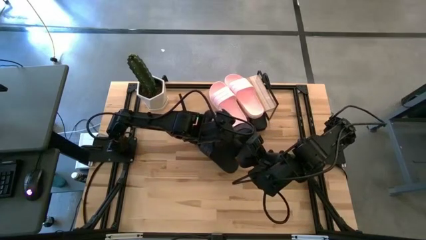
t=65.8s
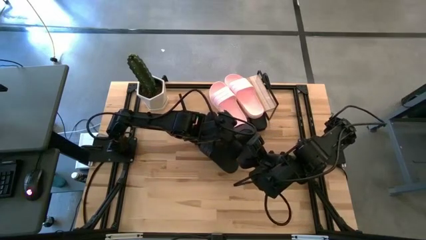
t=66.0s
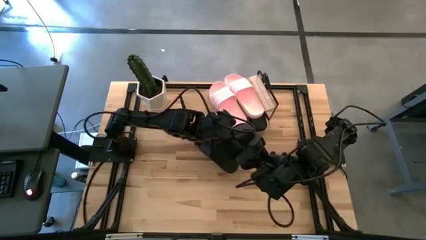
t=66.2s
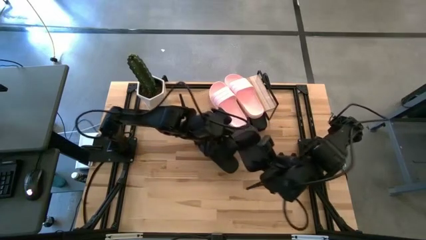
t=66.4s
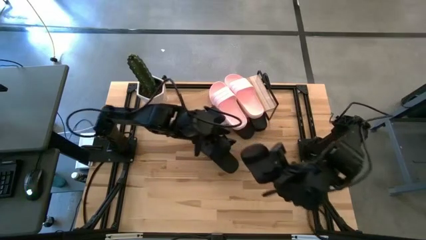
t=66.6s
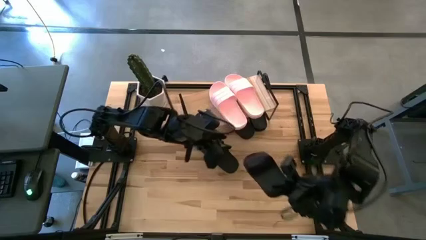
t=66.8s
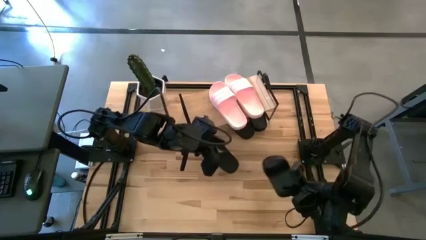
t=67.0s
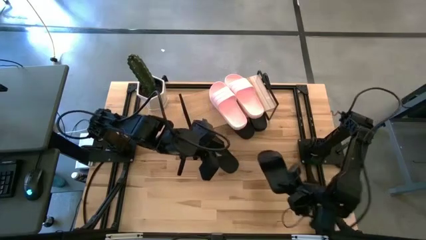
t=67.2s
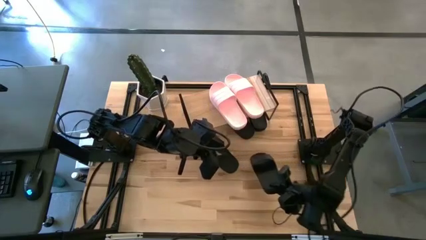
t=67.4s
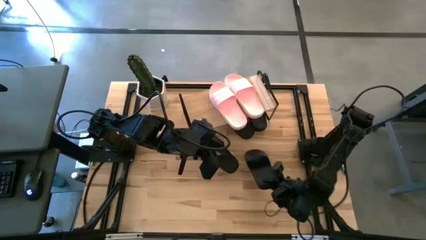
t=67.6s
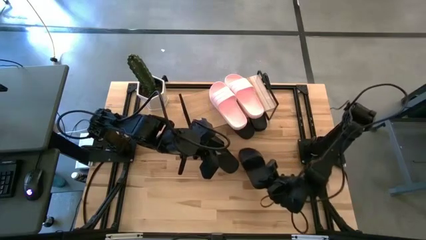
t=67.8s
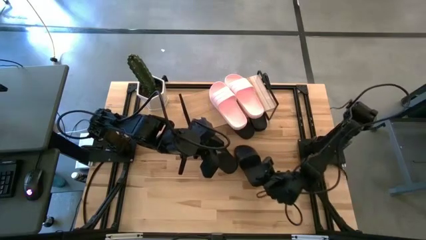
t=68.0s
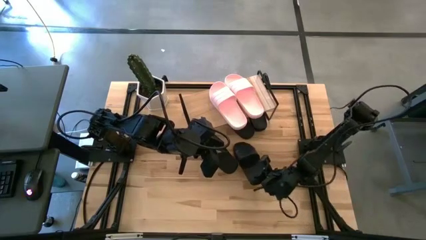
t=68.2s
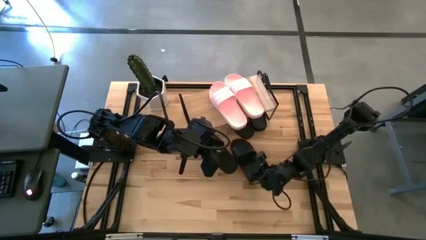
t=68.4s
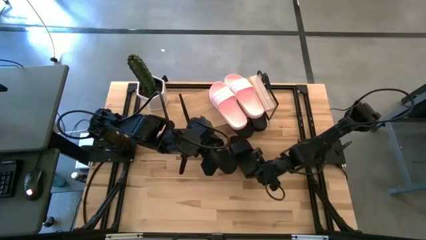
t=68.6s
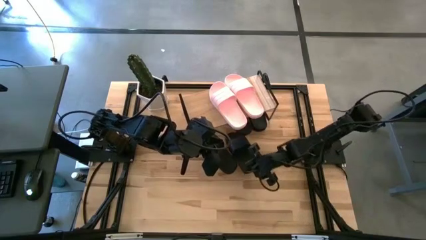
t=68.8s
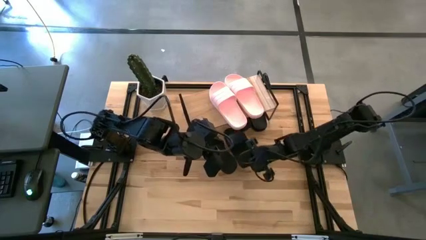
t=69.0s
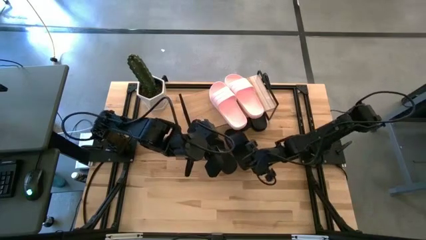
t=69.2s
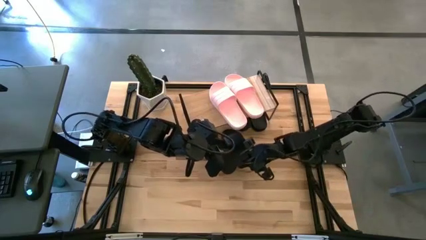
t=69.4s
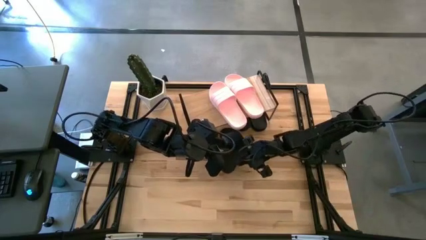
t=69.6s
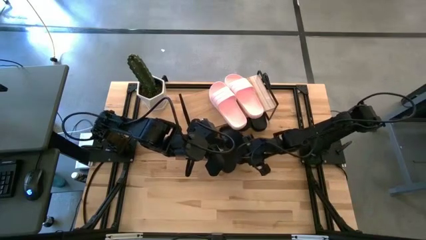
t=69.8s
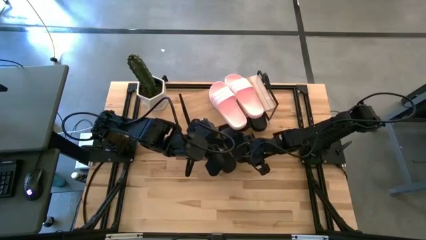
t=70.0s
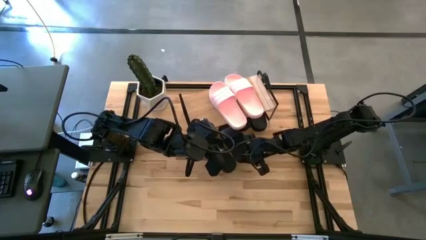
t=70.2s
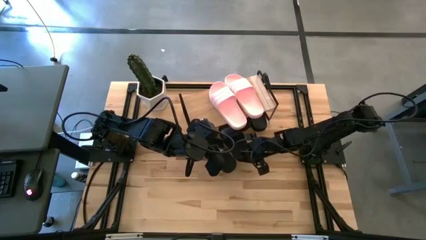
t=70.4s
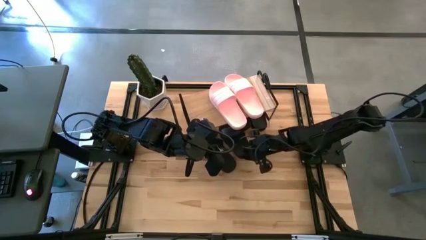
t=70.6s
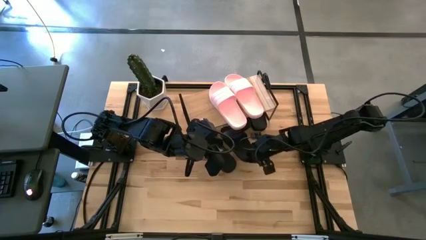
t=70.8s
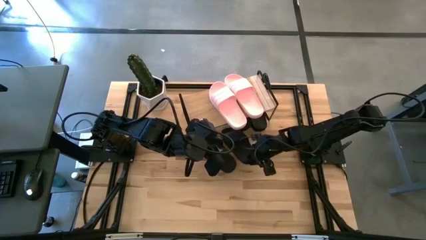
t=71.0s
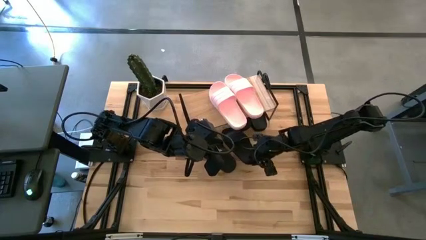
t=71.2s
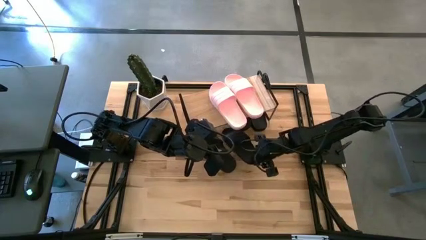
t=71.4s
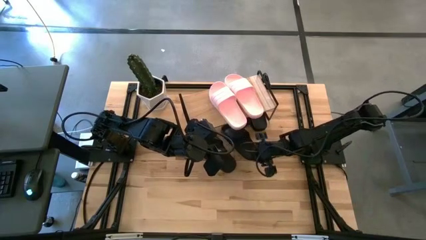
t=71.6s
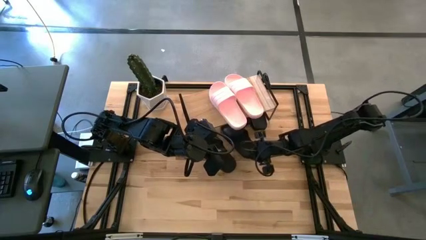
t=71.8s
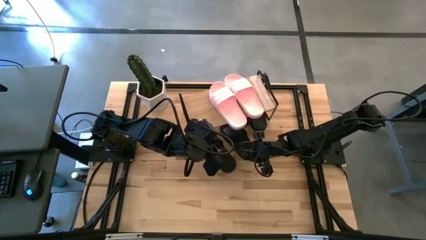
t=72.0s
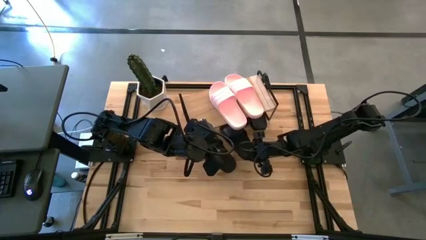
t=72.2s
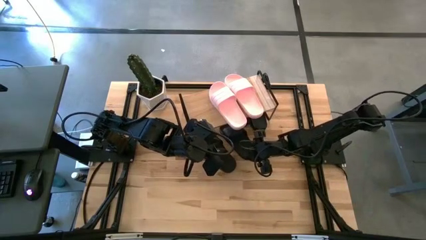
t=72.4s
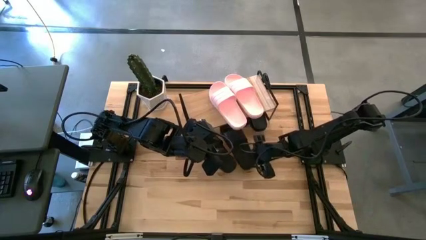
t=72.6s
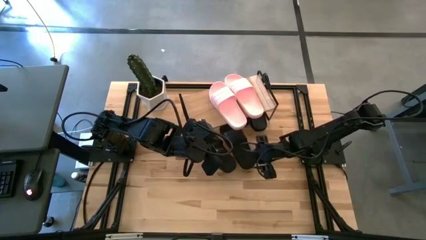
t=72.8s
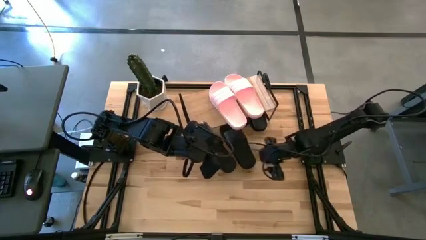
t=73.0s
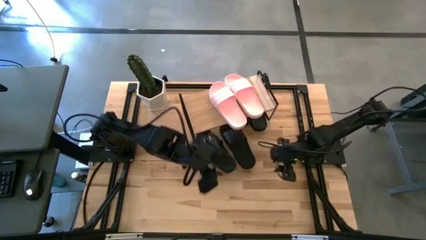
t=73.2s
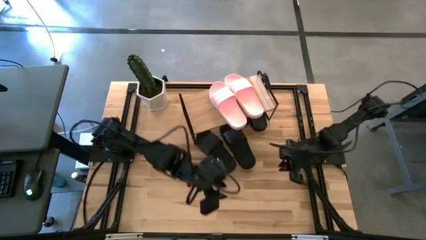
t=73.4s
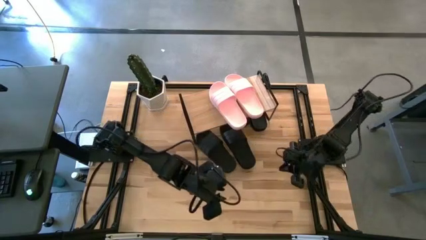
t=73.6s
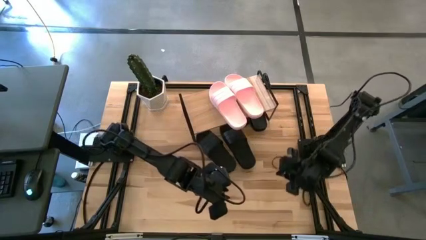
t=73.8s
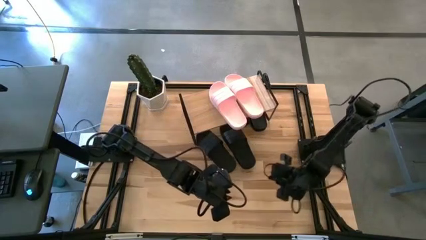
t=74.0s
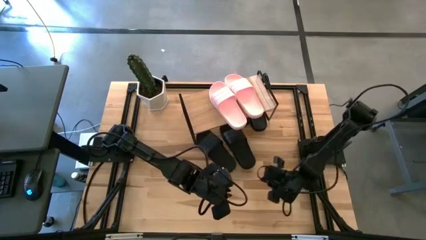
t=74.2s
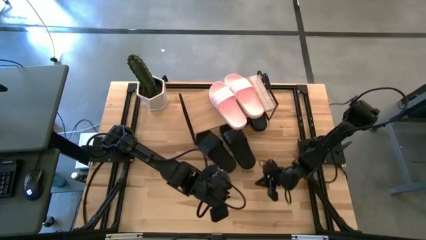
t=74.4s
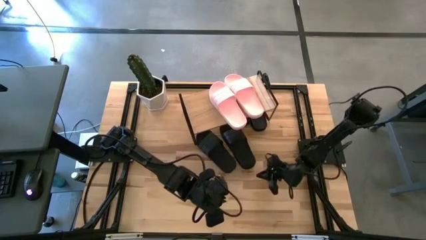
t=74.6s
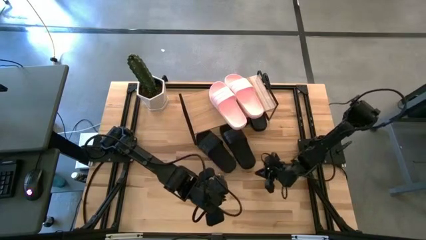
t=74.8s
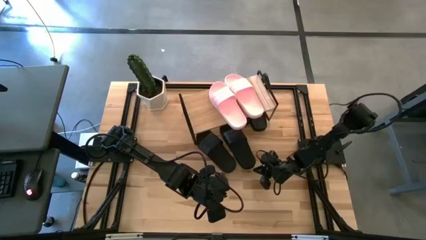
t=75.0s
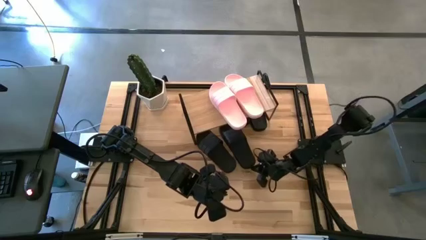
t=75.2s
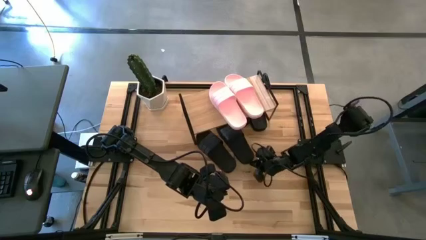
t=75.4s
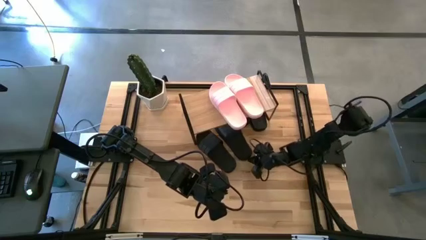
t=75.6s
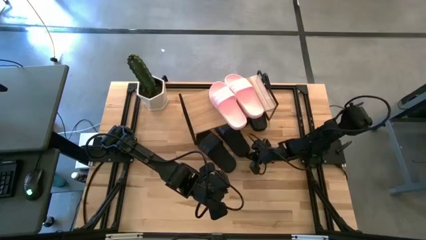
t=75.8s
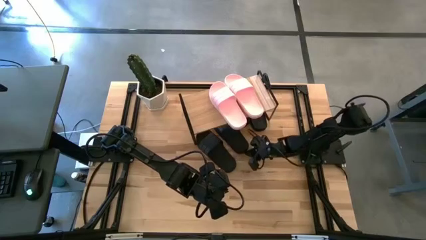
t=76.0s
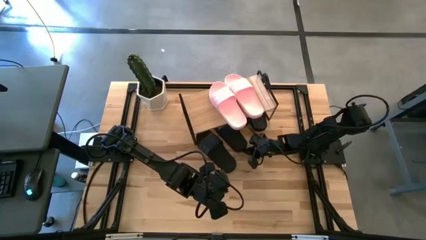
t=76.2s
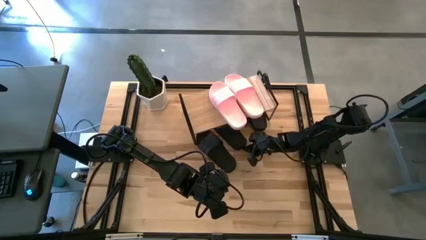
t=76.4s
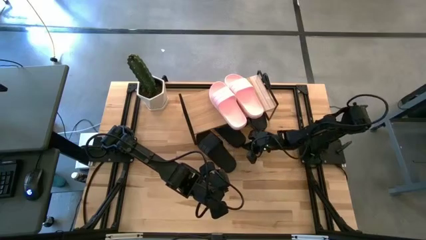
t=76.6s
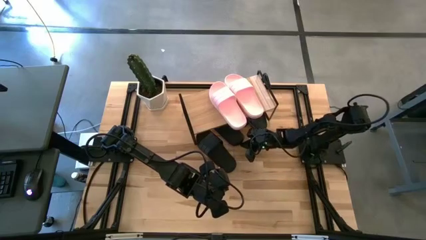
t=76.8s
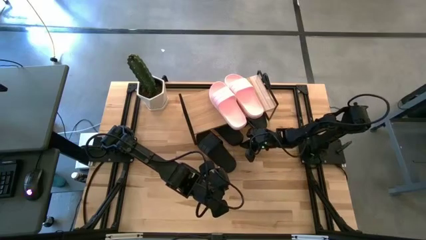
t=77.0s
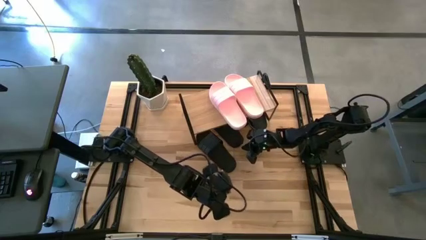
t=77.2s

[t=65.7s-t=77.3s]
Task: Pick and place slides into the shelf
Put the black slide under the shelf

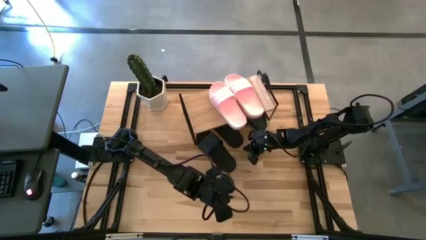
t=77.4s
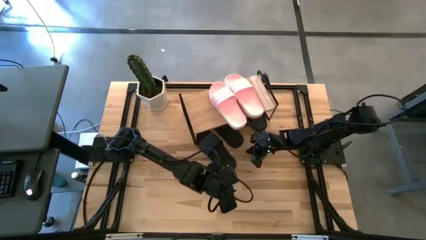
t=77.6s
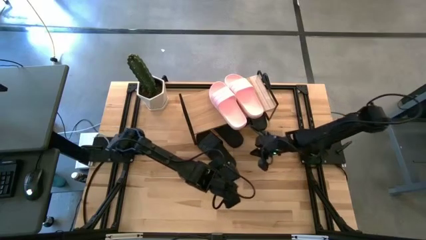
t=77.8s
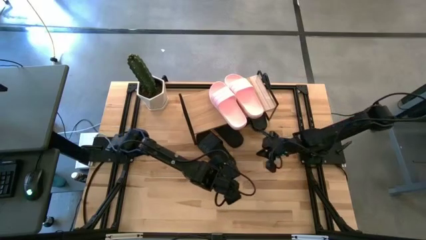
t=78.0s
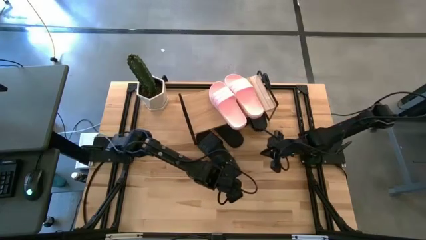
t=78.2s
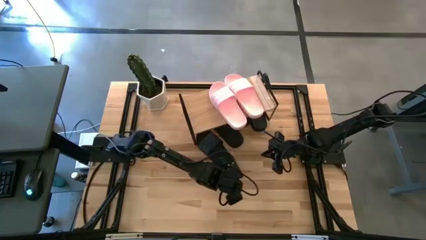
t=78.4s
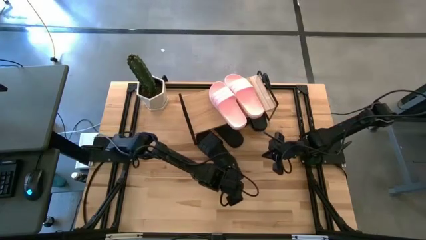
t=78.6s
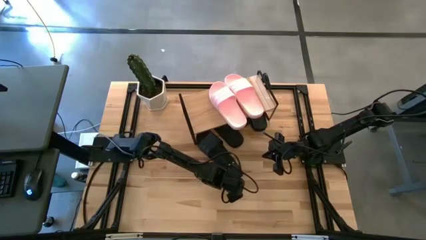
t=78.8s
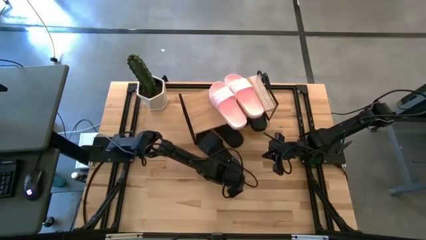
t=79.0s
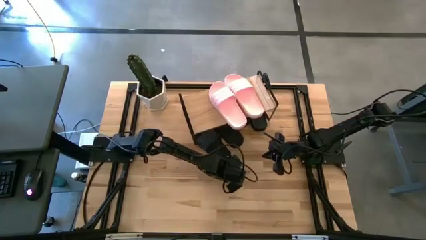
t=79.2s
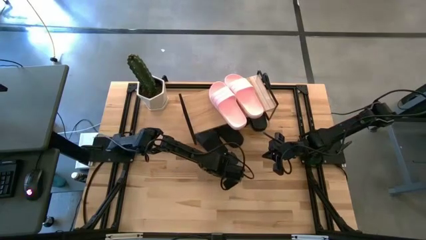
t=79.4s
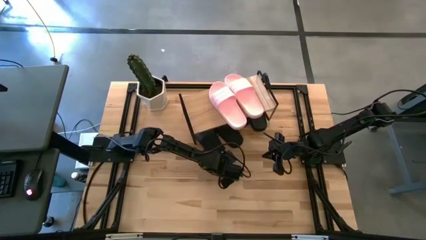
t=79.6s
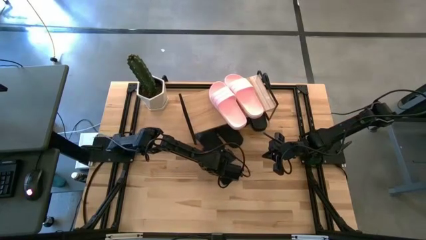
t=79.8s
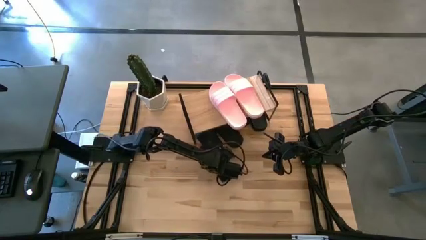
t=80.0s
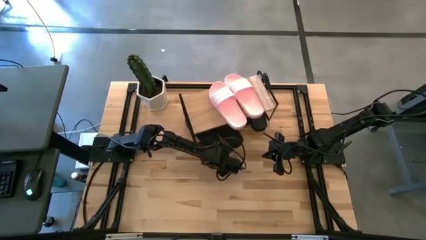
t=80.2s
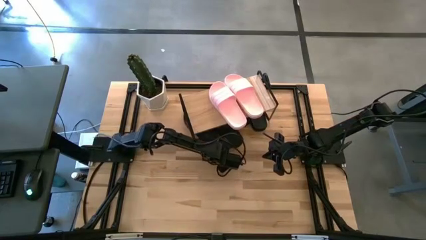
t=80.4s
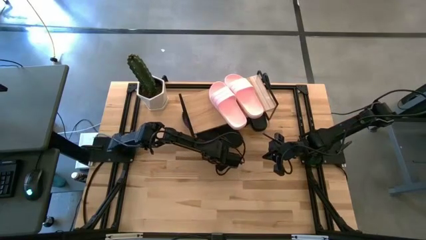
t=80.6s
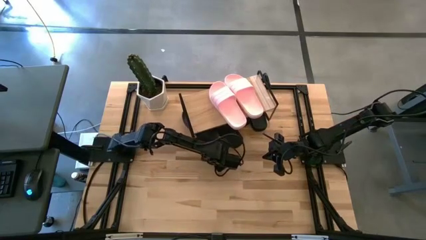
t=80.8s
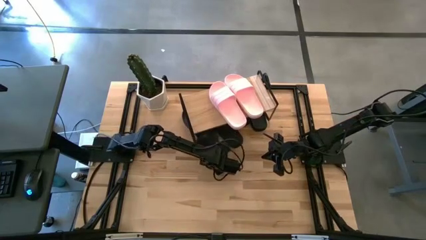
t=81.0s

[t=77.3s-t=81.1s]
Put the black slide under the shelf

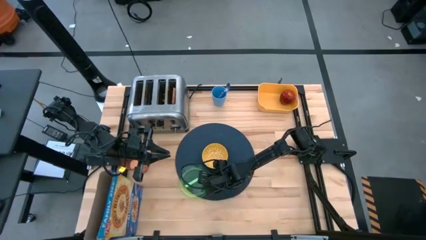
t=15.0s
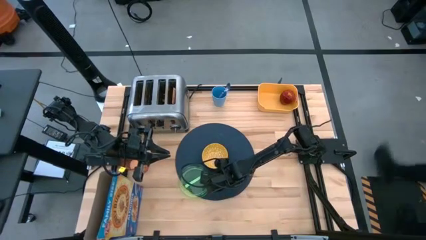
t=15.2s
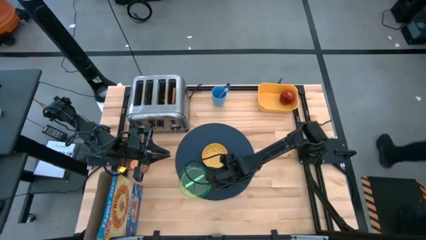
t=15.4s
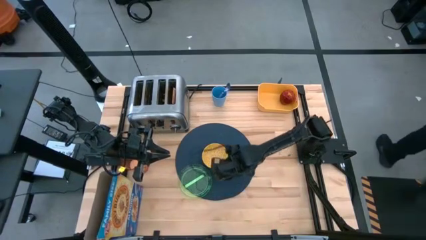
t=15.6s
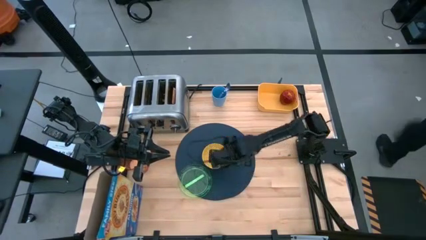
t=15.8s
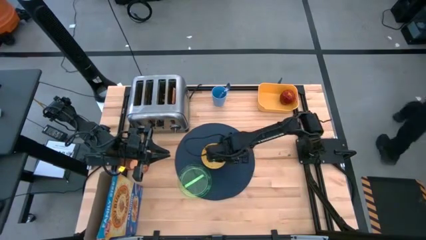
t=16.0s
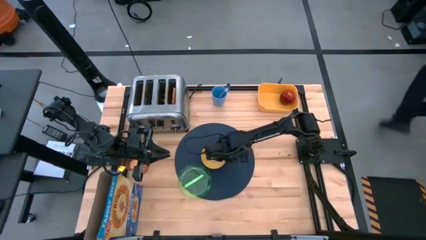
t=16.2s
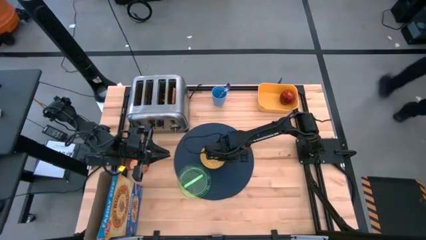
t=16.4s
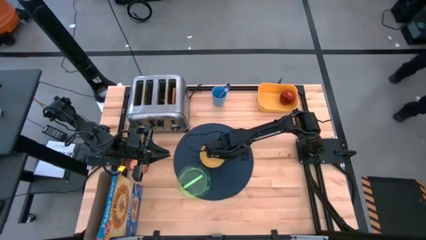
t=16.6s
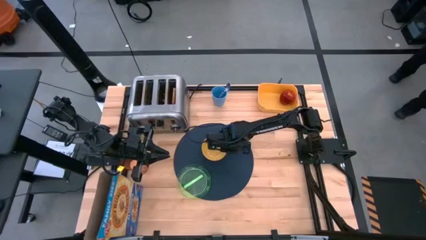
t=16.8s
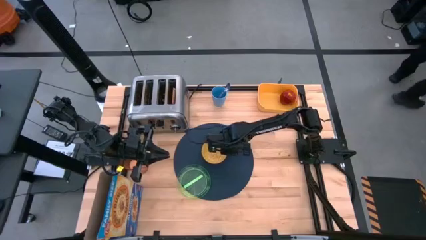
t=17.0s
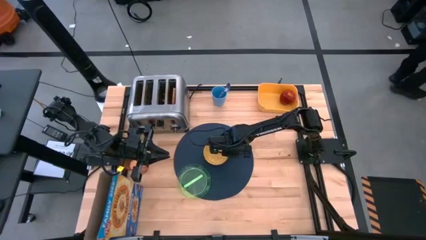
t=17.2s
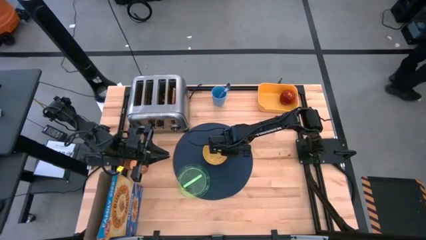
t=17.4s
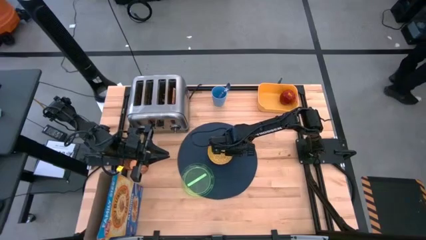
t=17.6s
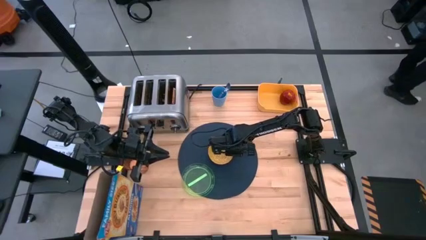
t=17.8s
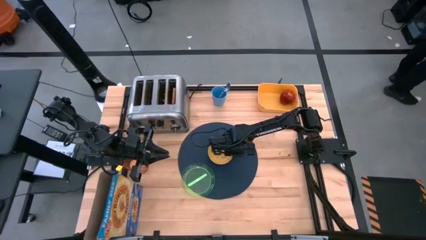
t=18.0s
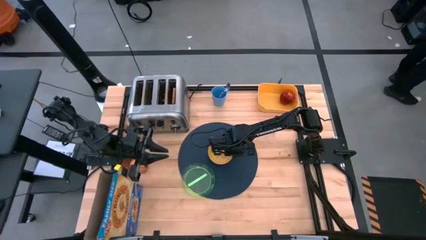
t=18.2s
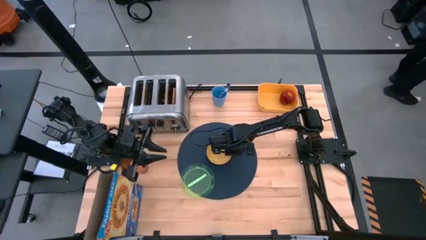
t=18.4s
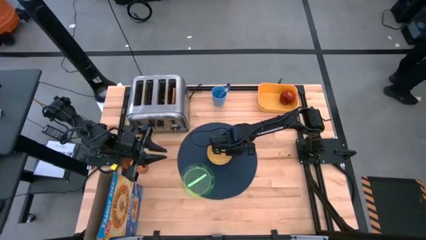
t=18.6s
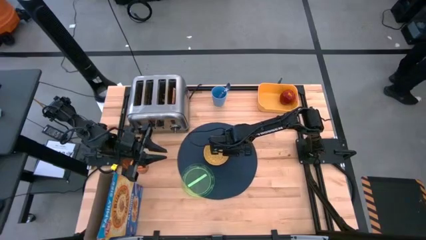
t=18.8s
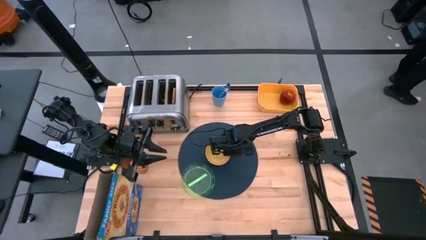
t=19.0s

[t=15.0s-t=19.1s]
Task: Arrange a breakfast setting
Adjust the yellow bowl on the placemat
